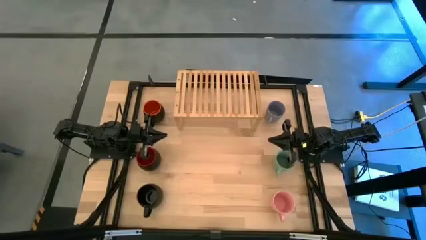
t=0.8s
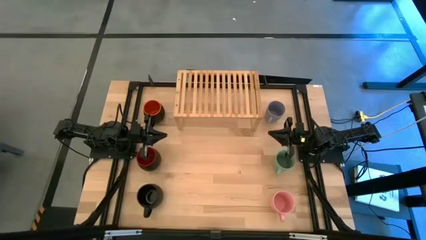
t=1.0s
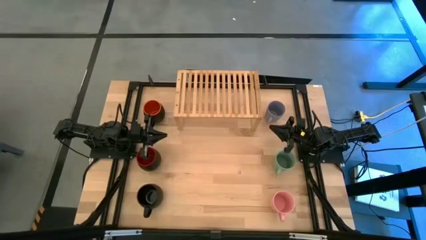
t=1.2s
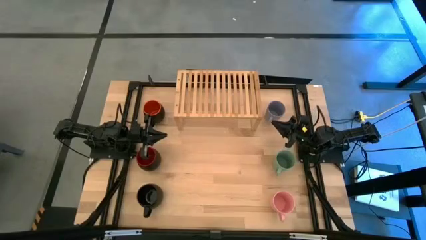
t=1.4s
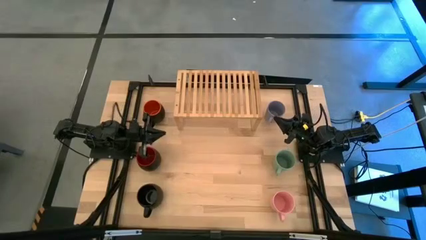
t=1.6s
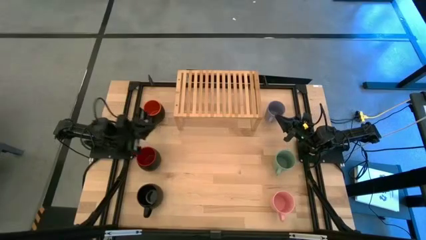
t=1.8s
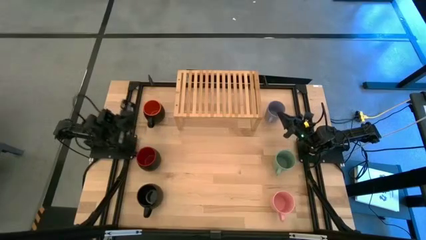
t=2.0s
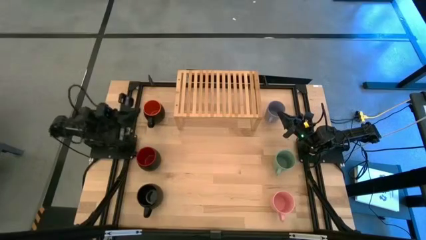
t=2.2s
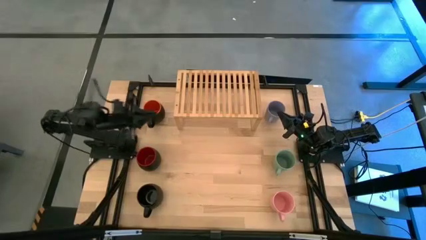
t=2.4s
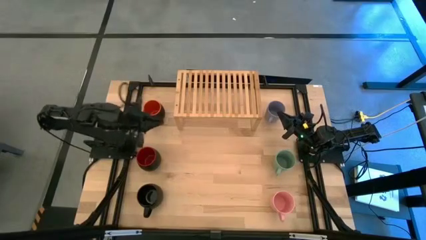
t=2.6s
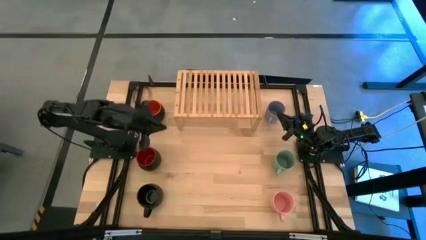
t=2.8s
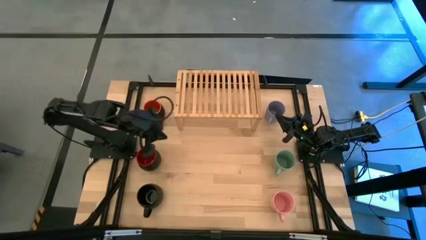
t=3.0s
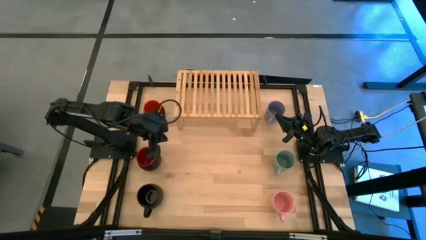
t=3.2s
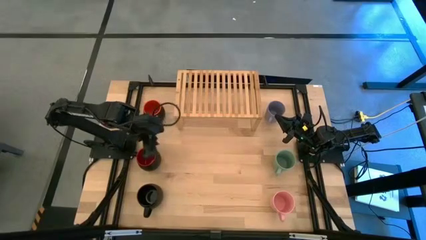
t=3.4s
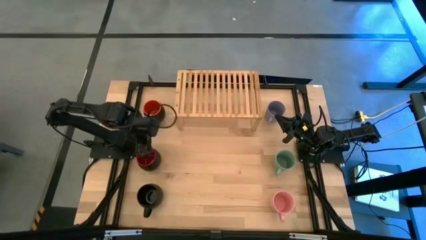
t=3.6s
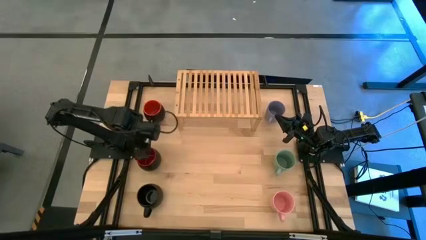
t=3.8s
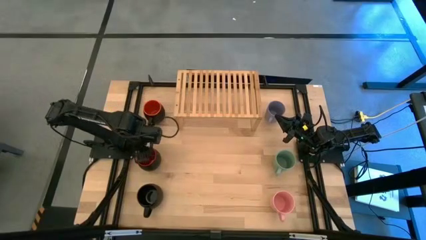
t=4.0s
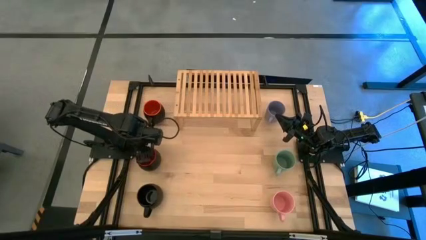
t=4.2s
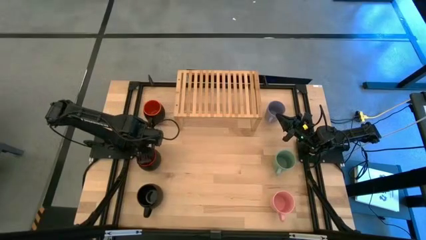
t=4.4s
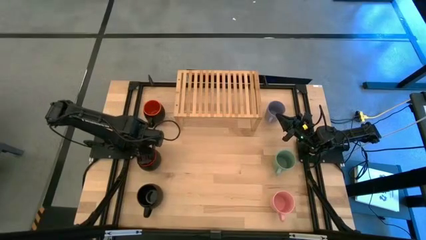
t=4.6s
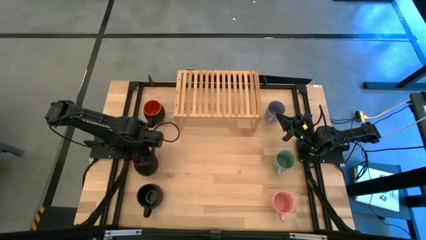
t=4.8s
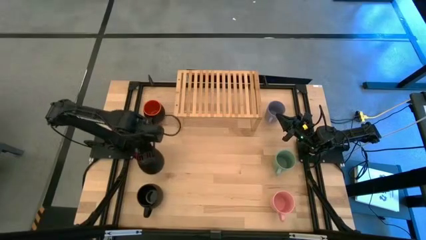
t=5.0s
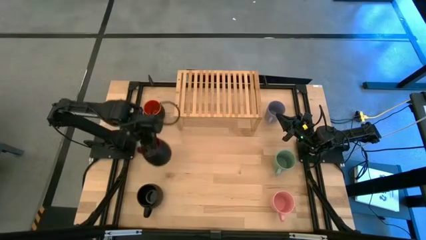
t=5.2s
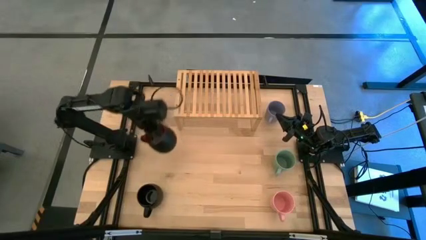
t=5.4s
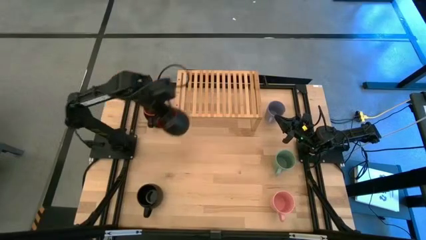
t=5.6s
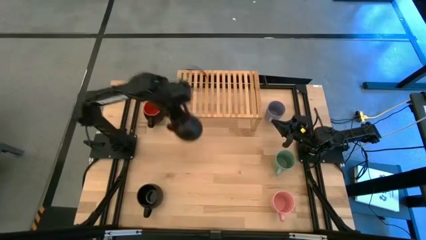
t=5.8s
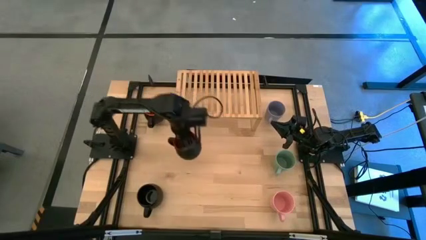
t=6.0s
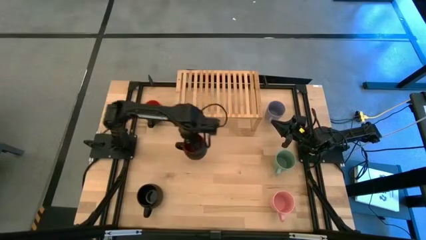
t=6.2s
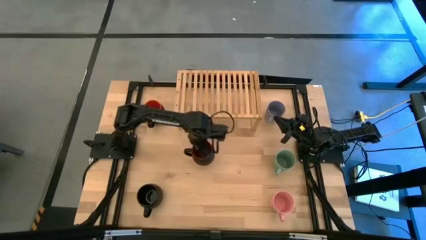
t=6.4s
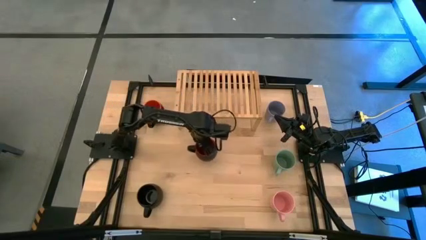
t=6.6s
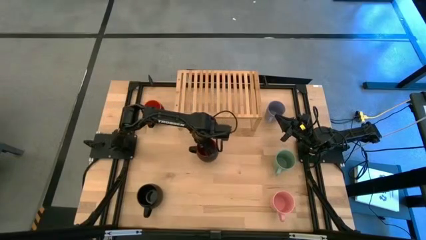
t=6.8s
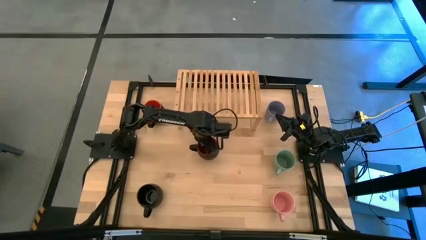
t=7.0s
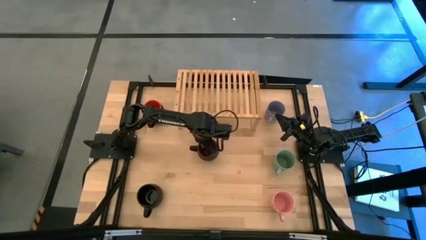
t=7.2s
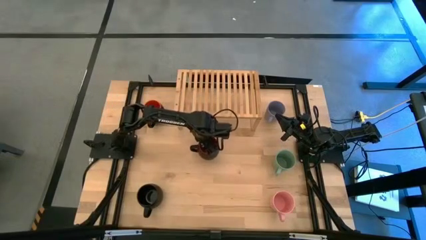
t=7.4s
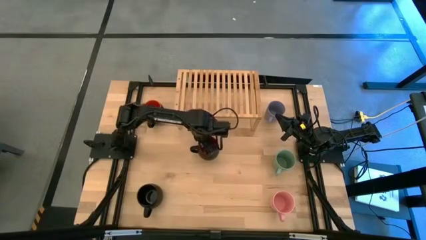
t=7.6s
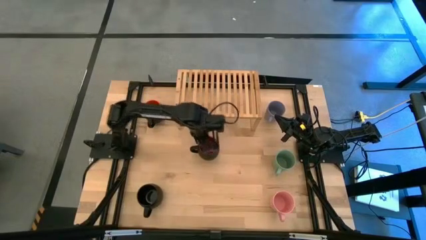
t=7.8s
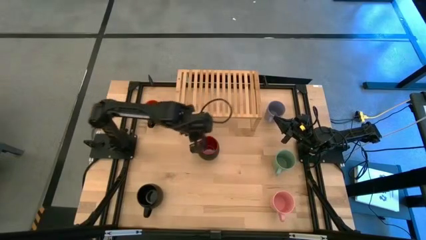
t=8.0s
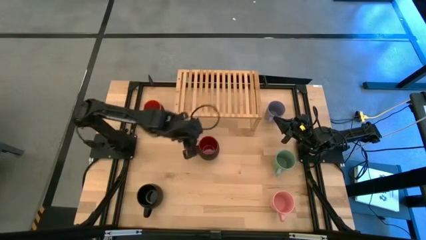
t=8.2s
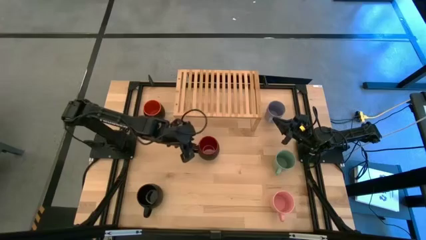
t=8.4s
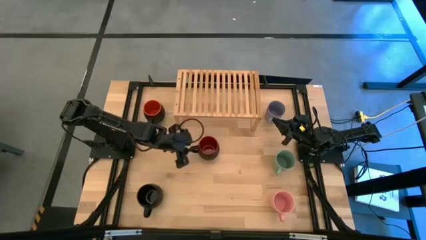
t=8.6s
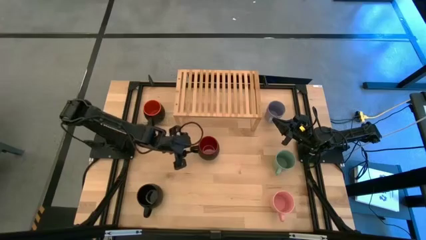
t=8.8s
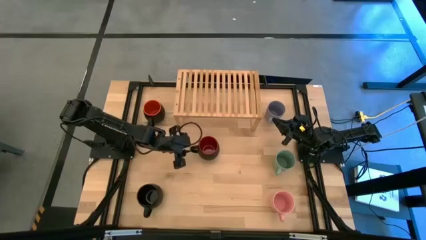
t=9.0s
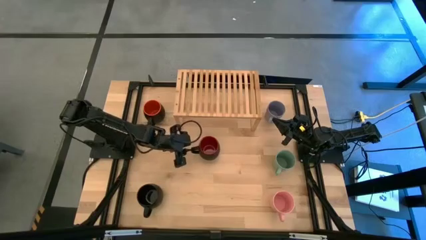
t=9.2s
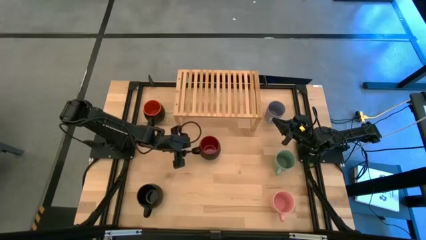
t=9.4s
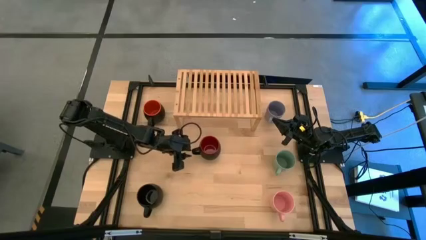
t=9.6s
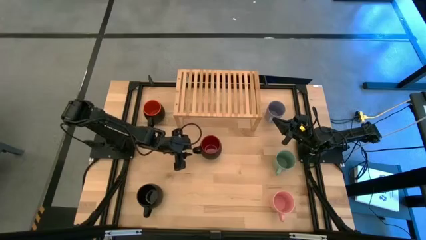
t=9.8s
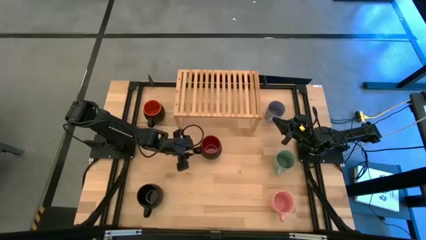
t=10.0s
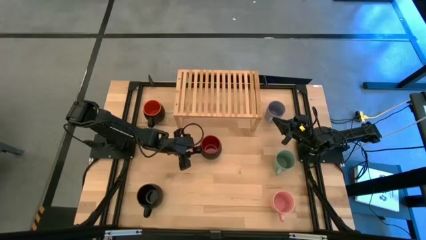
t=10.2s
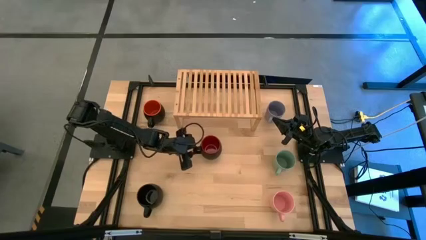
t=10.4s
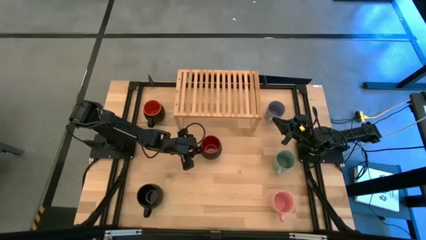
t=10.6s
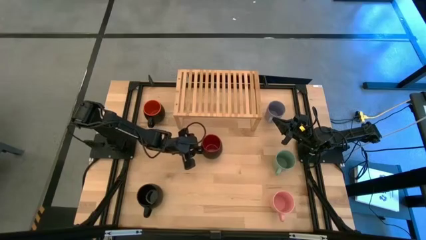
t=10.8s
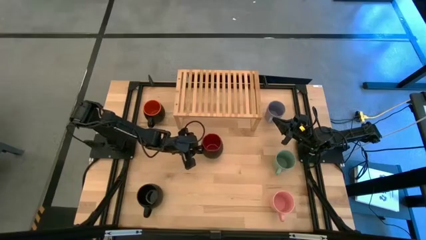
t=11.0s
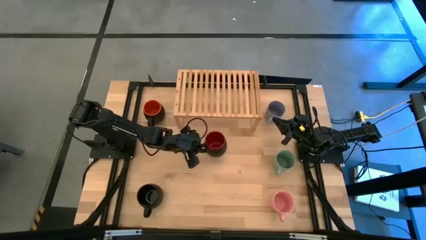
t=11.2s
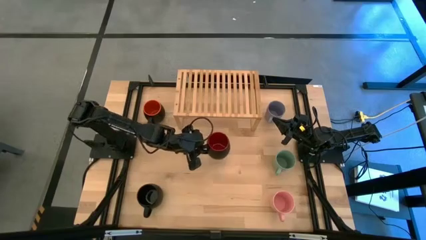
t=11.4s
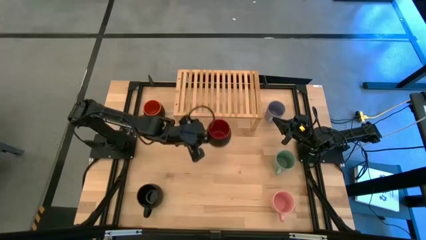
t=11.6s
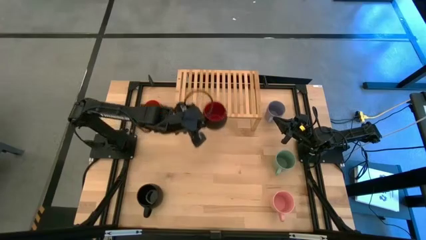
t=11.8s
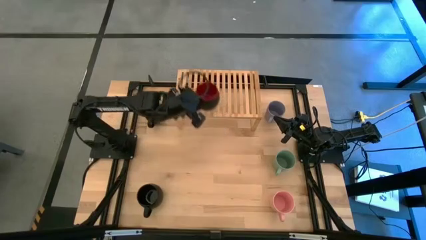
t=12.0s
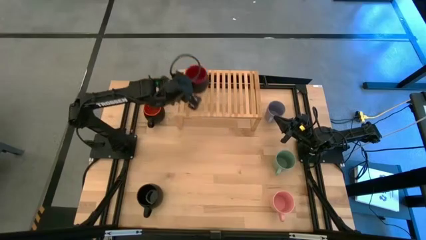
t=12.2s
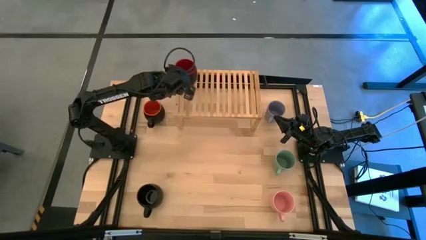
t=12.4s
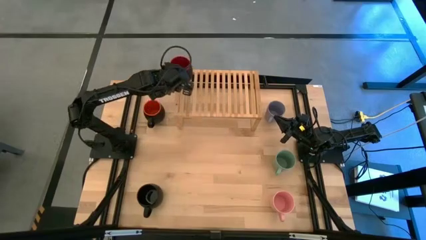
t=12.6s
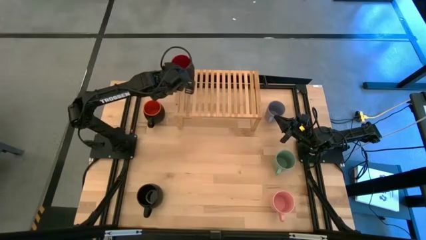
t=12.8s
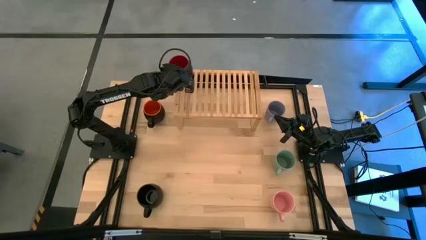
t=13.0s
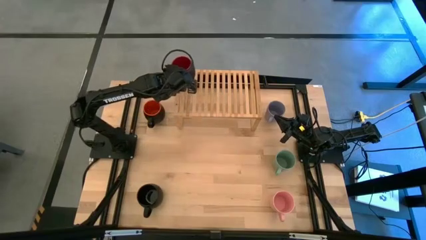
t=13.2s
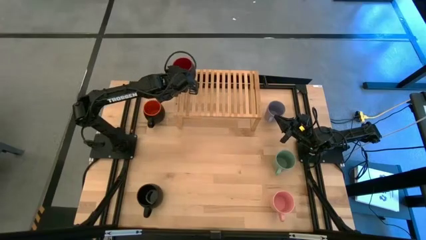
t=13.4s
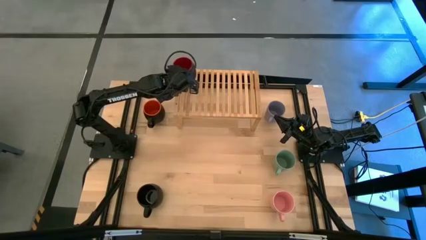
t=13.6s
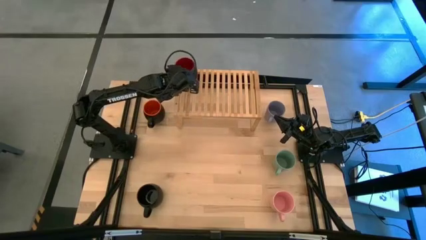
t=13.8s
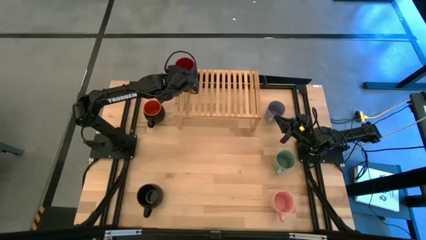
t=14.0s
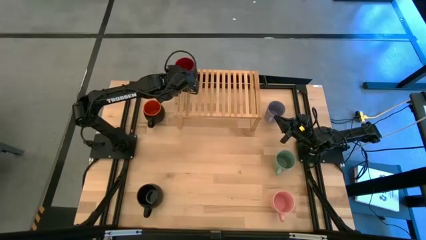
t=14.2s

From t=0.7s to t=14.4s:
Task: Place coffee mugs
Put the black red mug onto the shelf
